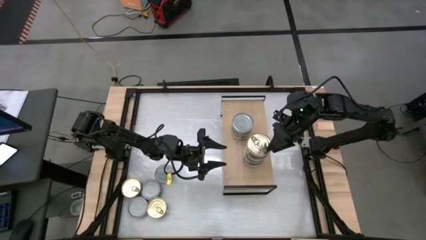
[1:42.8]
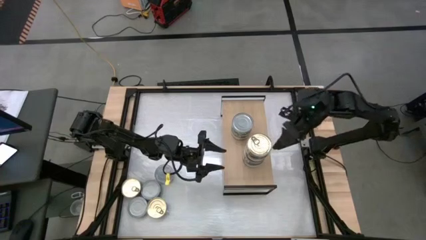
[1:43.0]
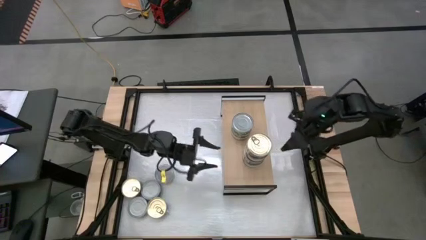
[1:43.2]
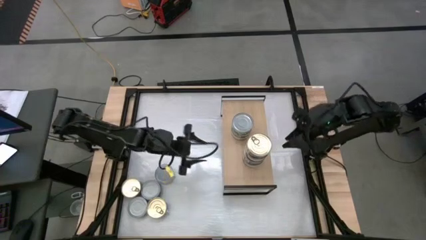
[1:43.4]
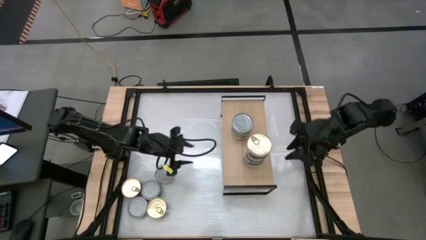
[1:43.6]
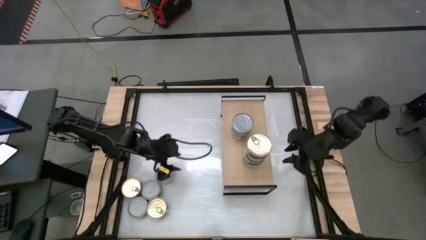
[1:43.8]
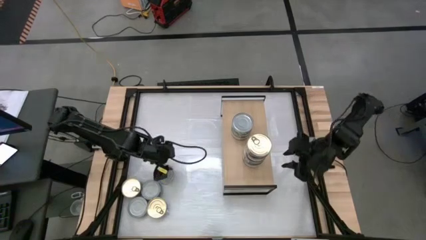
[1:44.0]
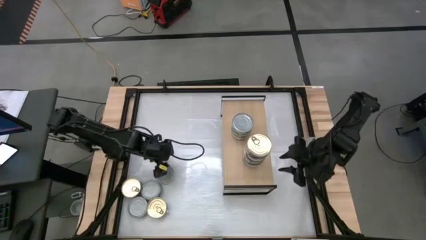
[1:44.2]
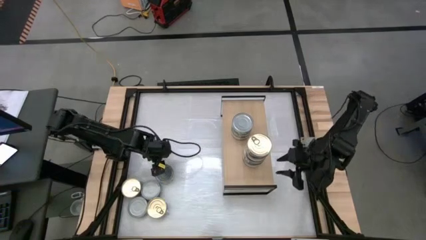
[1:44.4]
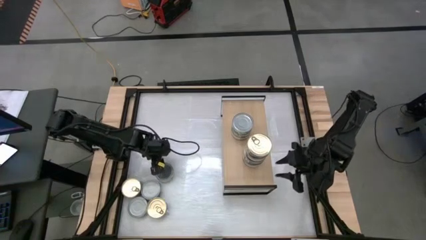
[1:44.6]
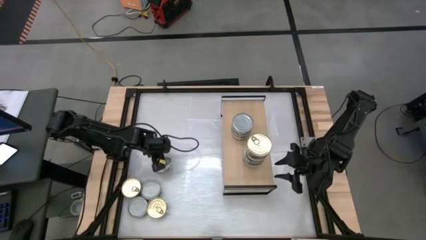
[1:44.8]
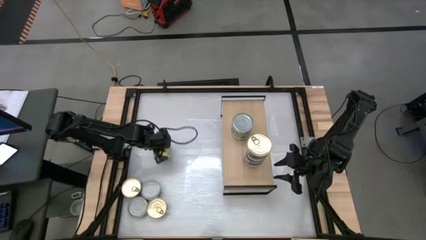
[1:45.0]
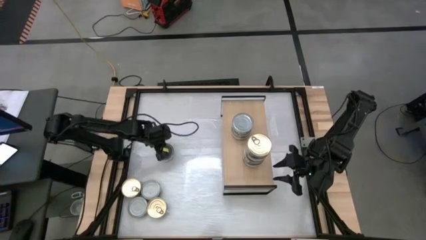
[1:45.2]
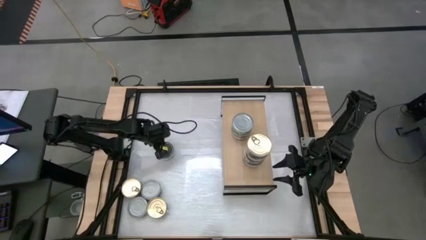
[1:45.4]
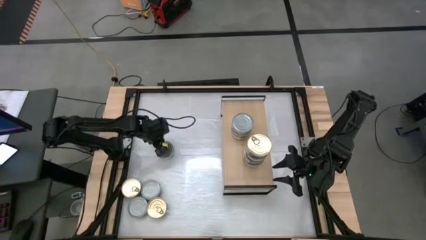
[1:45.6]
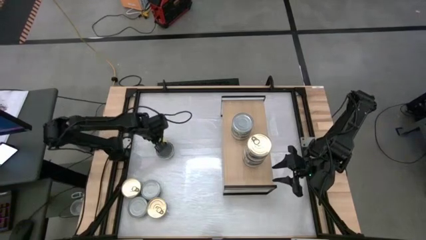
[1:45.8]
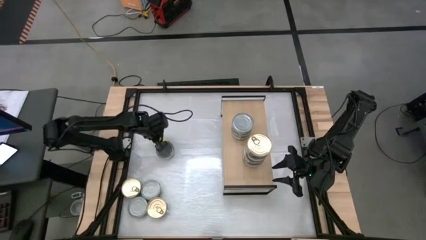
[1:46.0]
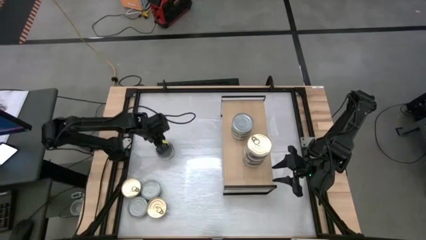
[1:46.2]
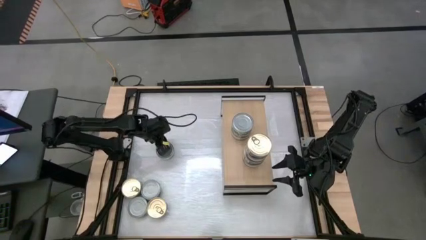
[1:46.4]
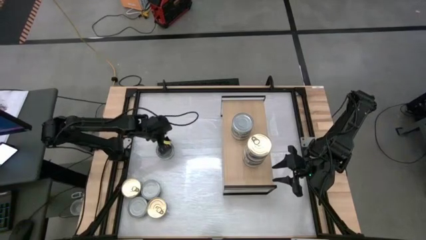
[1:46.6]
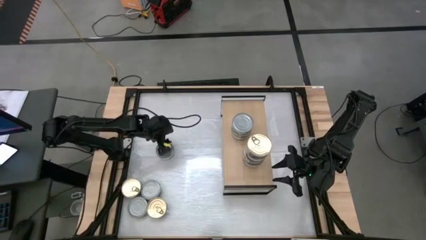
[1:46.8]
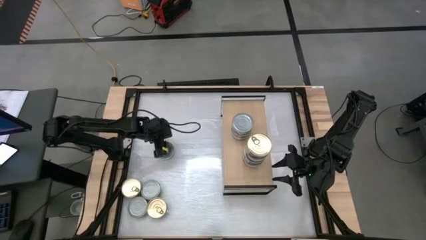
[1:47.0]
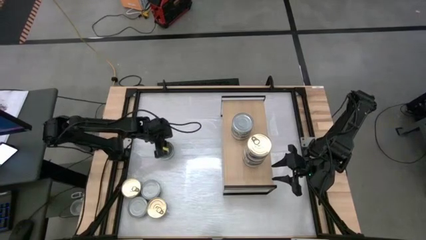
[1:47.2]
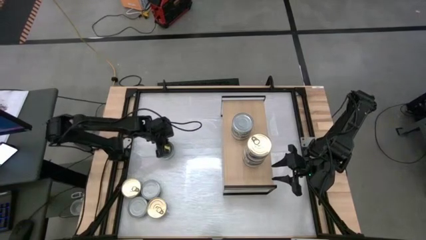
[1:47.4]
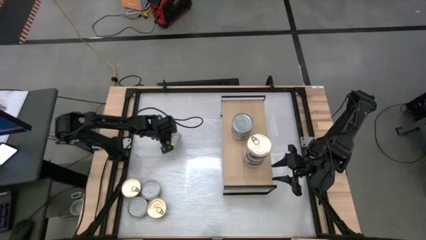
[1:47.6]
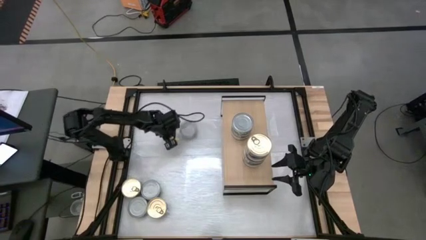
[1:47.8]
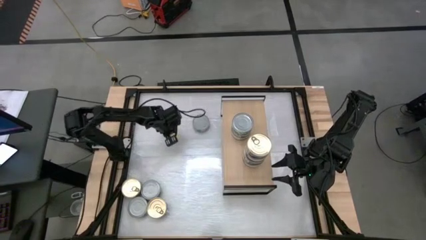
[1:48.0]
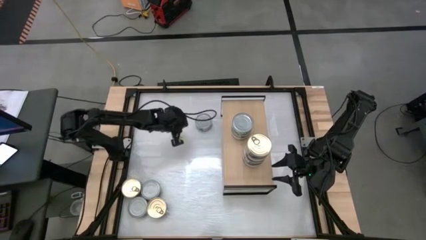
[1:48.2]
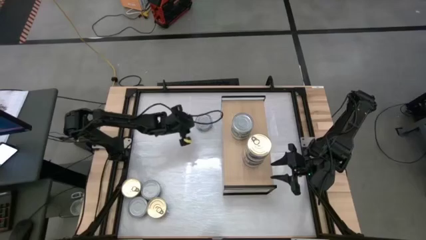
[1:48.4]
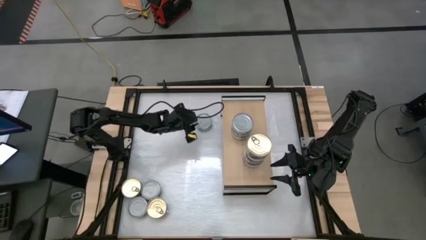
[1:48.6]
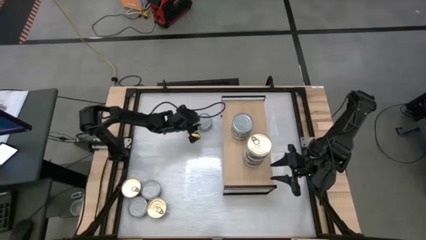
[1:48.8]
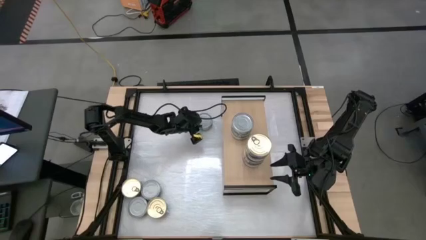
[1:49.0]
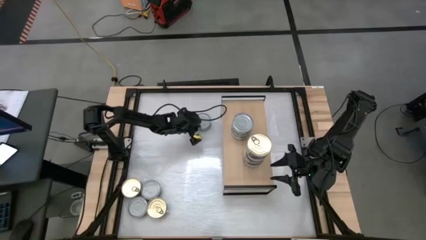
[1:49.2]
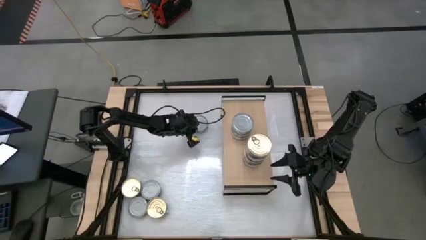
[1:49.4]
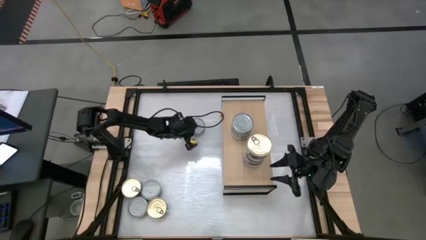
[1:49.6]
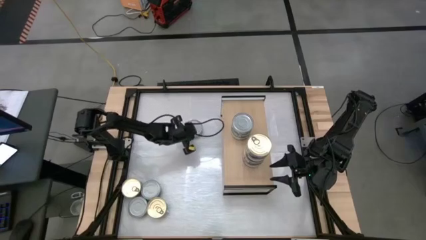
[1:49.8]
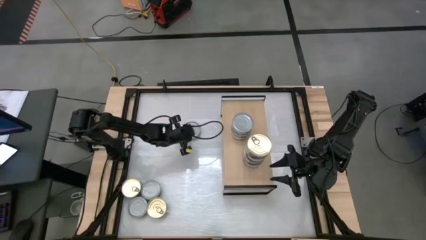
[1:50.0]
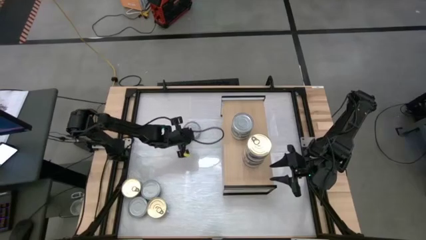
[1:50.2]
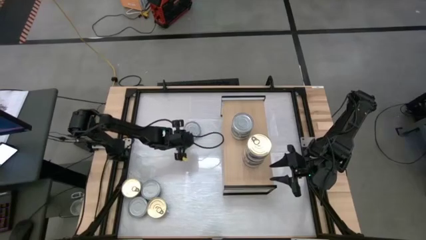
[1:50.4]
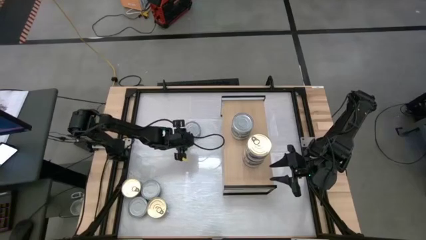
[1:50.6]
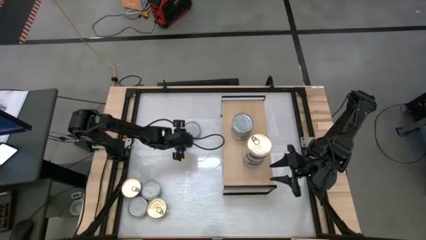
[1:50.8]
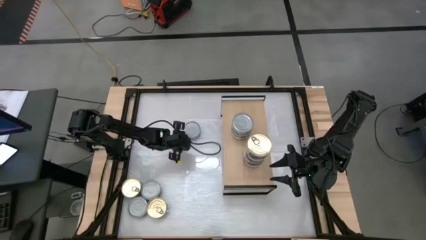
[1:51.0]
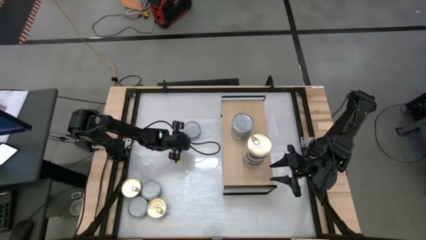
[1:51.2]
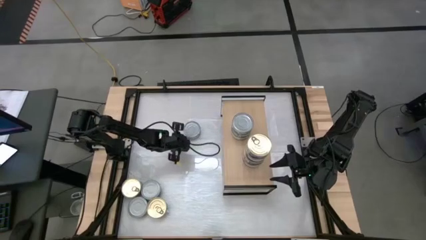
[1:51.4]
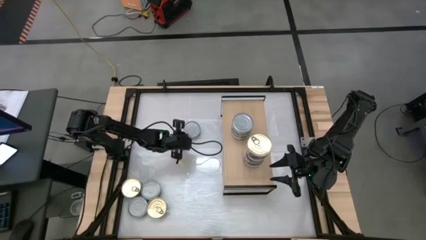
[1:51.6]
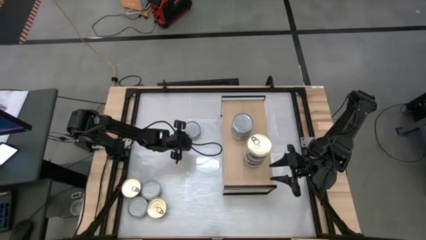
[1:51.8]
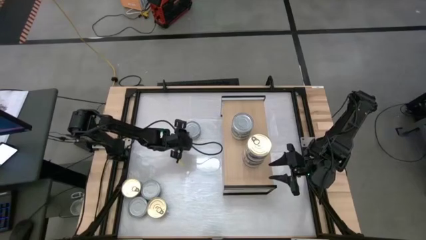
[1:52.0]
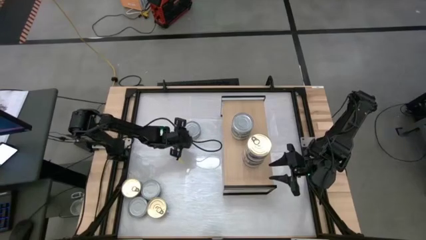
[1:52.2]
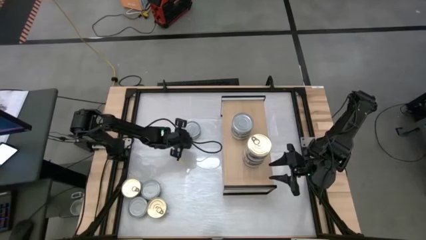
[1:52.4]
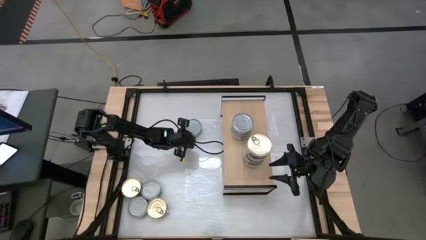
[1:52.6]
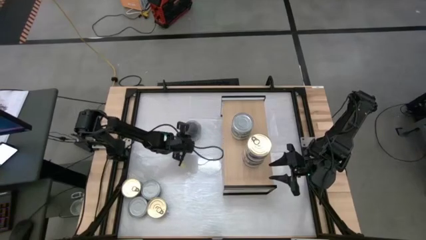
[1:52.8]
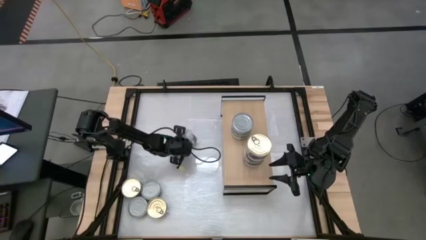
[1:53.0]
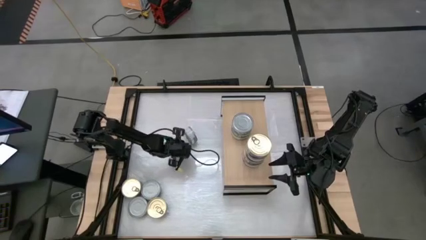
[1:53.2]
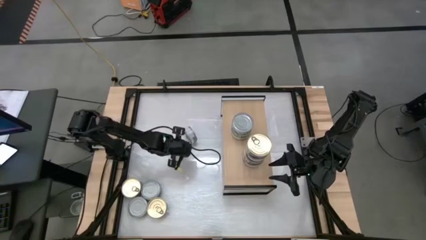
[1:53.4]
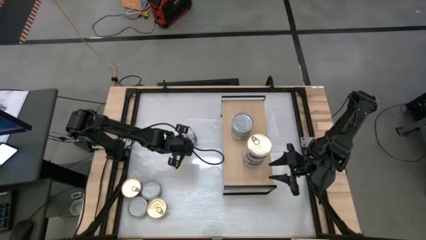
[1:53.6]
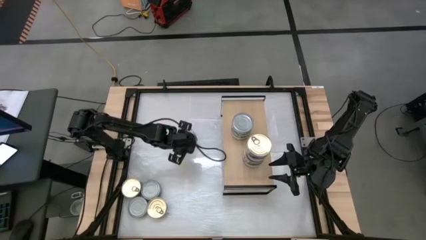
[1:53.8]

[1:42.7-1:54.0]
Task: Stack canned seafood by type on shelf
Stack the green tuna can on top of the green tuna can

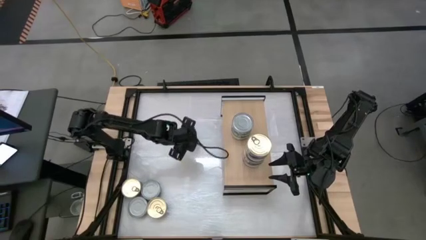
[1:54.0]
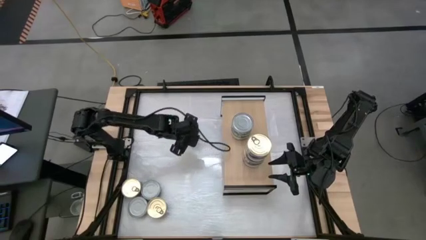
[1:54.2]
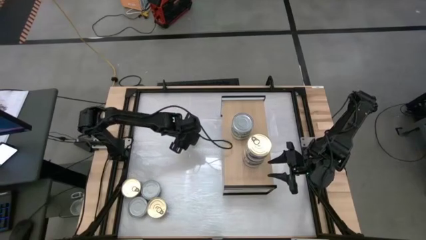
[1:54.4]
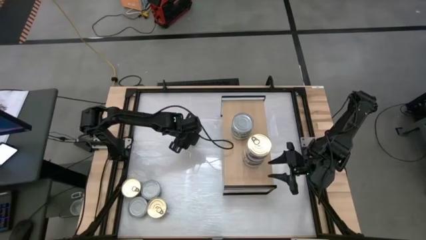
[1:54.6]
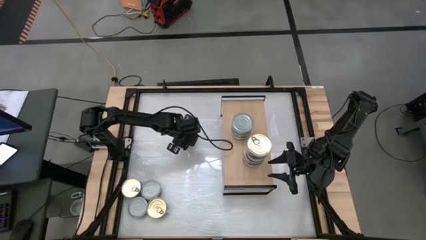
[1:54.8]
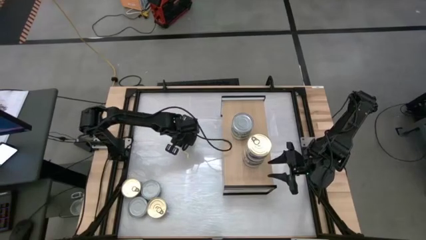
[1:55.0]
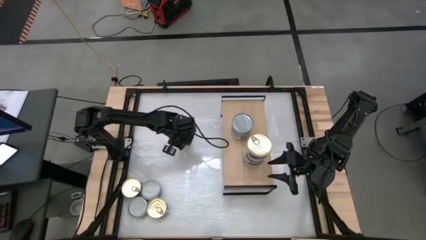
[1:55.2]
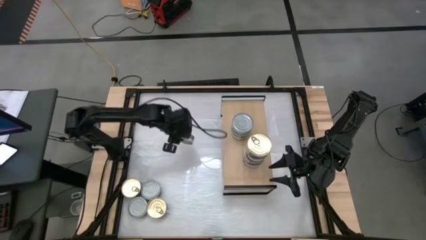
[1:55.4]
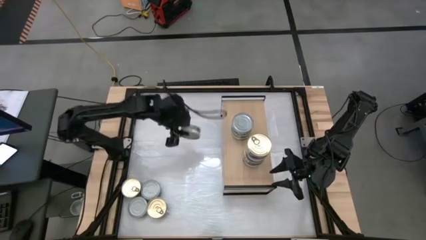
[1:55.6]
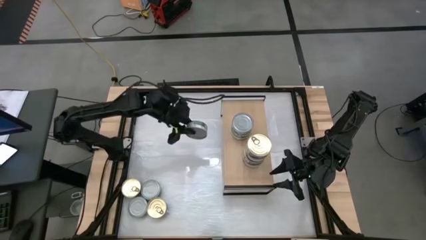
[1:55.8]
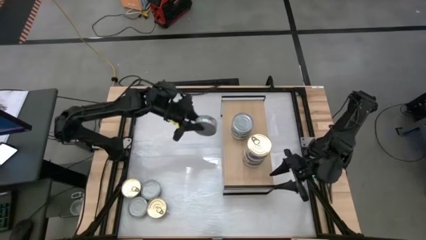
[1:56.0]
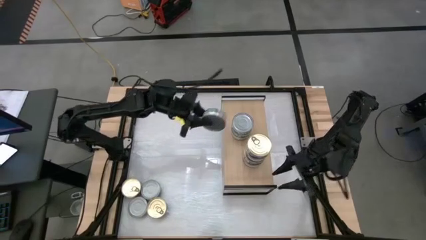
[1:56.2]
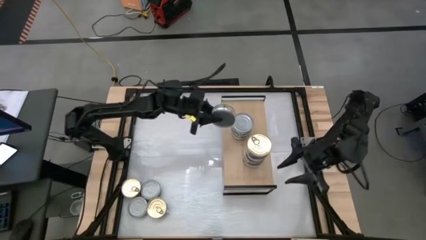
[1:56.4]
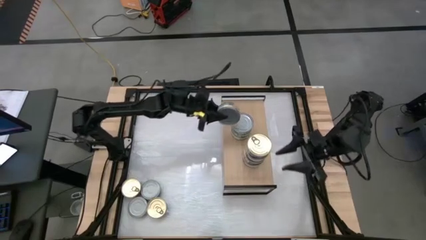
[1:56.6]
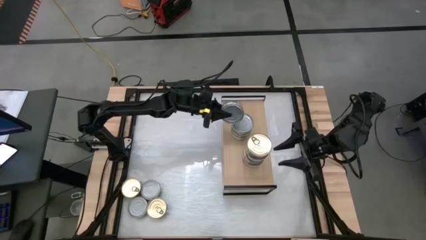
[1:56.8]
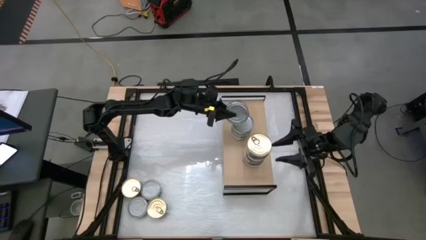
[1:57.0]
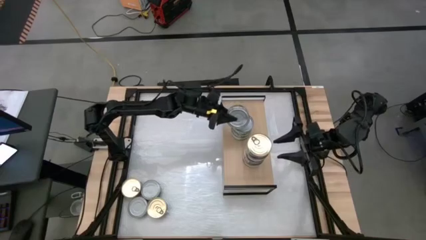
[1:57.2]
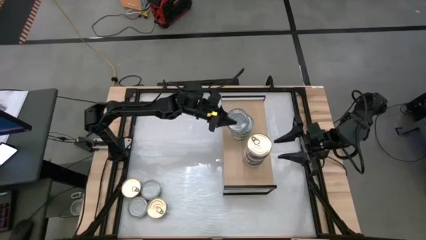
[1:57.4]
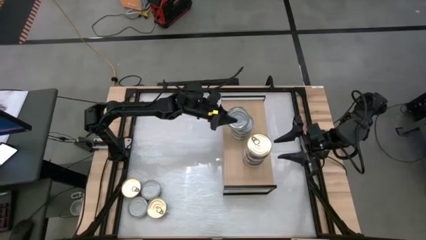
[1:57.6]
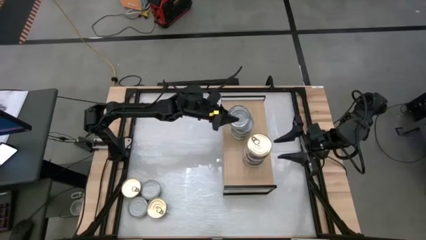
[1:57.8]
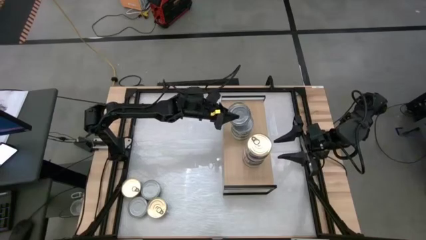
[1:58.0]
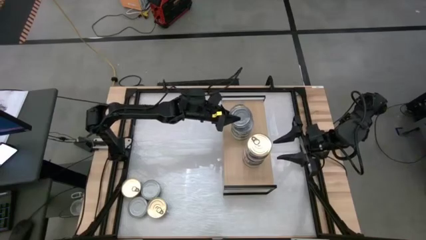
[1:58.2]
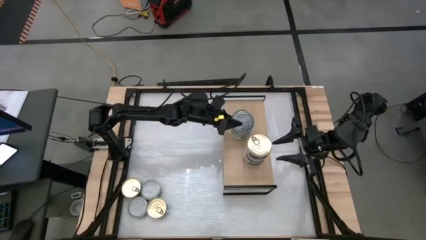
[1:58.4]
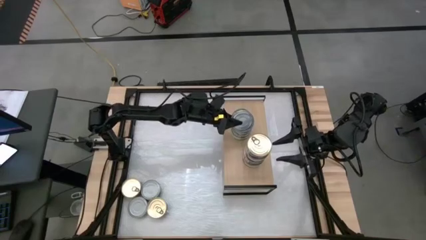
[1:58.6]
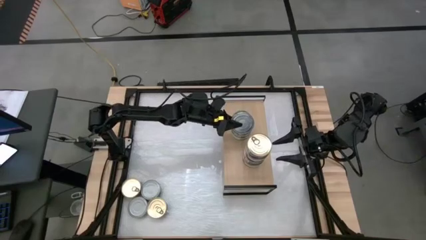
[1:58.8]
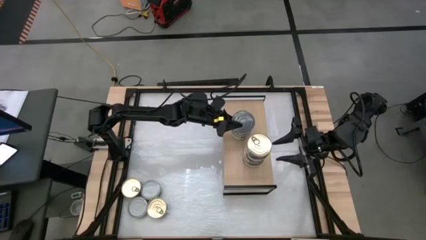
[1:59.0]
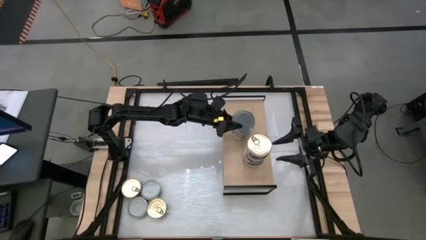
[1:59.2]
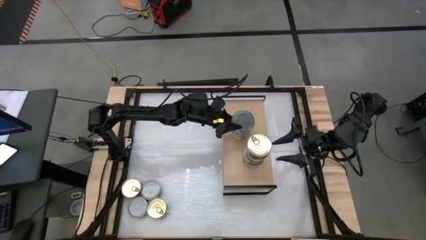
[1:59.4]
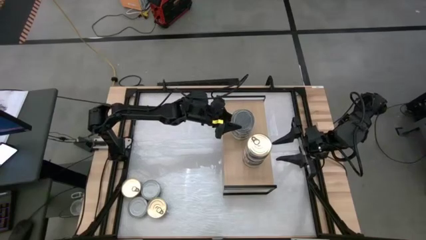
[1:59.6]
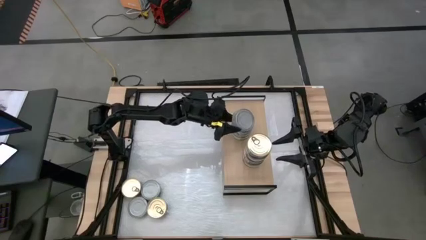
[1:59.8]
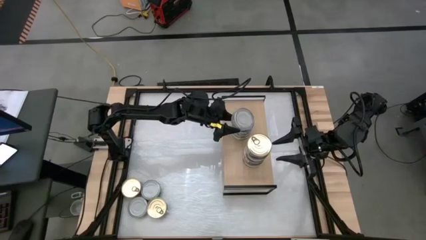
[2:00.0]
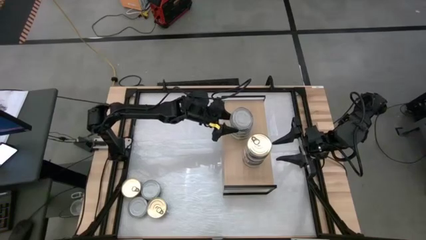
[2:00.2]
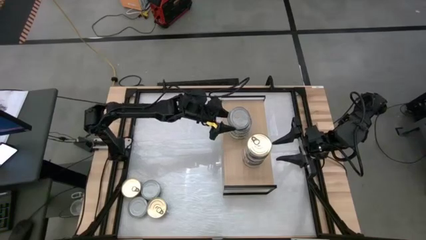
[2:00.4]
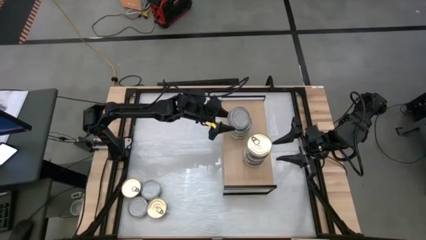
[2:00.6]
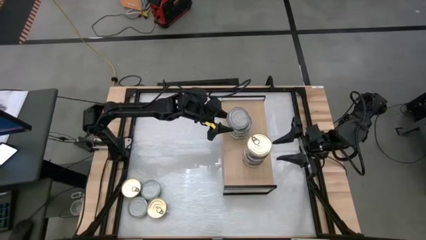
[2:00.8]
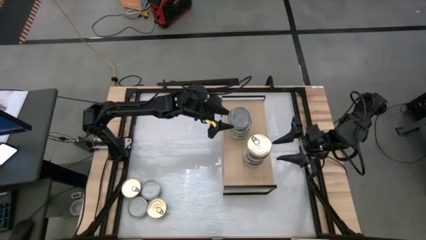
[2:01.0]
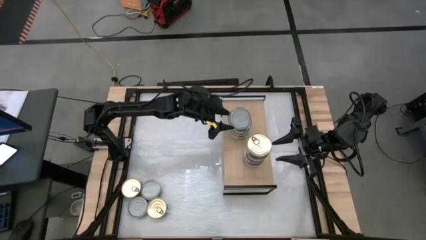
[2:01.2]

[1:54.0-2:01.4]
Stack the green tuna can on top of the green tuna can
